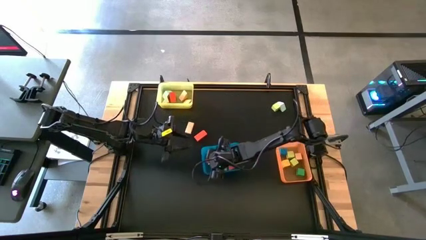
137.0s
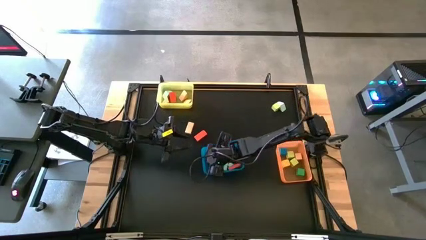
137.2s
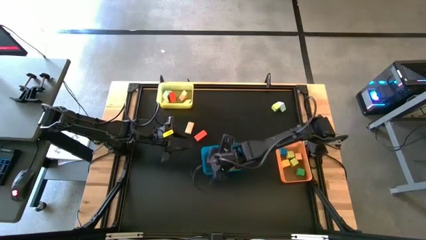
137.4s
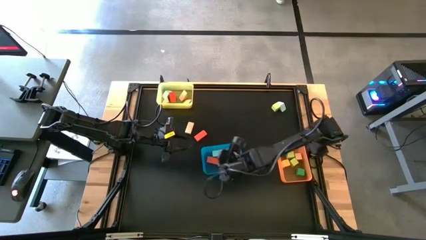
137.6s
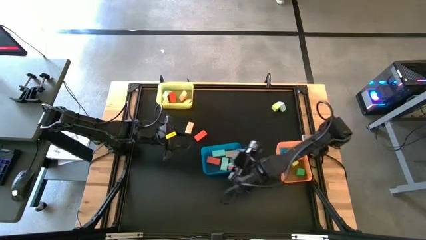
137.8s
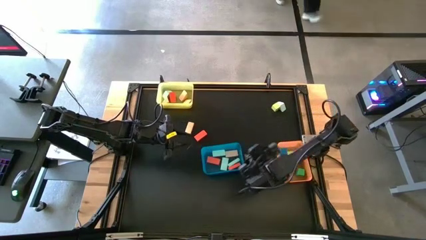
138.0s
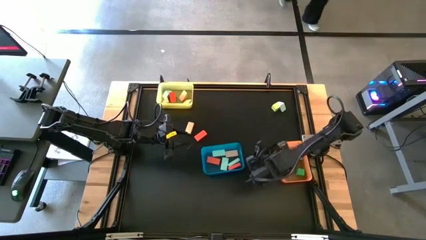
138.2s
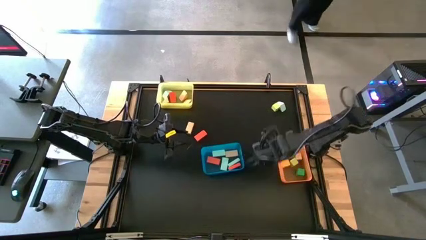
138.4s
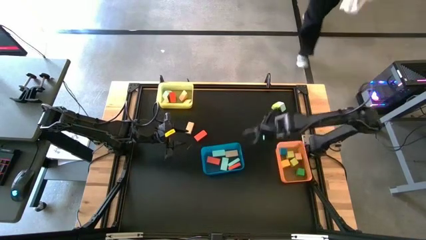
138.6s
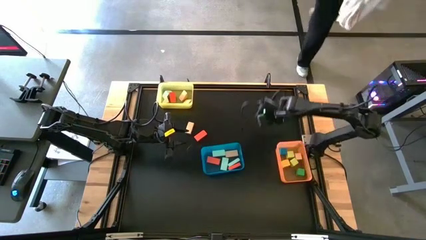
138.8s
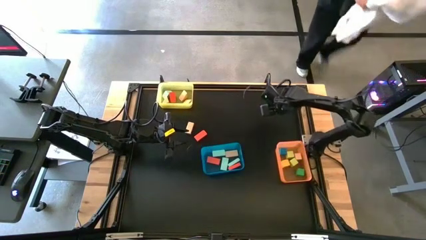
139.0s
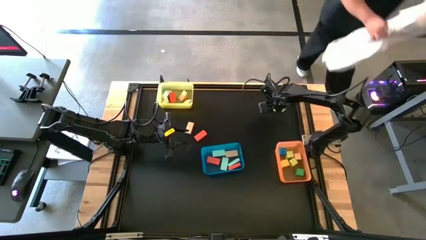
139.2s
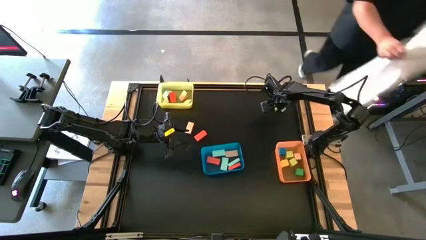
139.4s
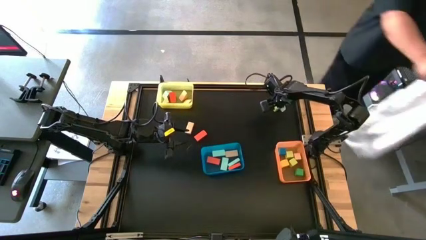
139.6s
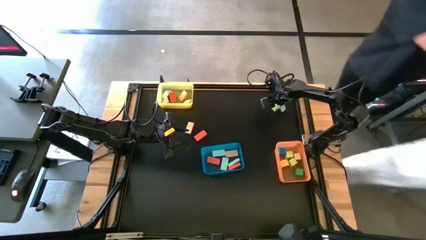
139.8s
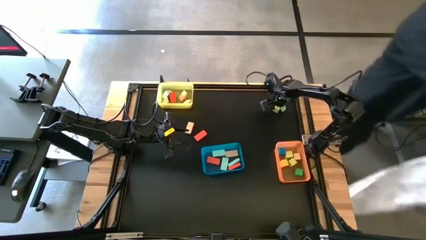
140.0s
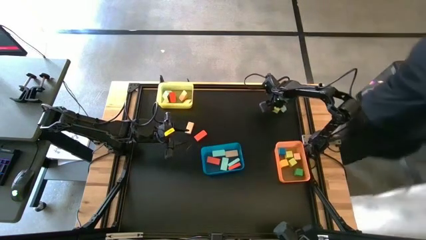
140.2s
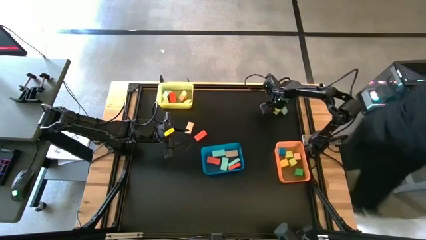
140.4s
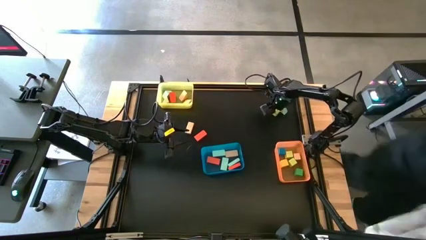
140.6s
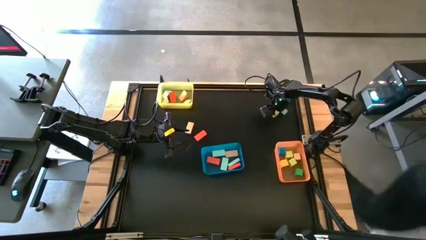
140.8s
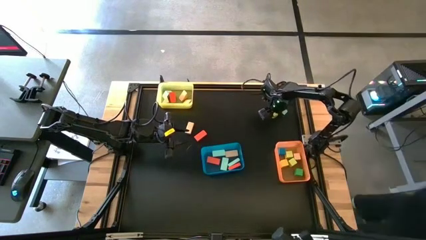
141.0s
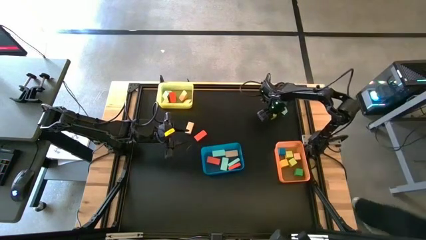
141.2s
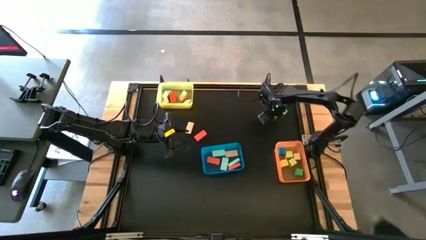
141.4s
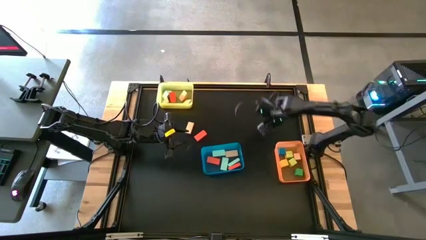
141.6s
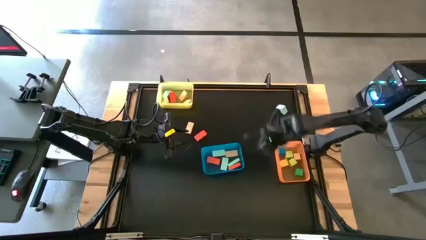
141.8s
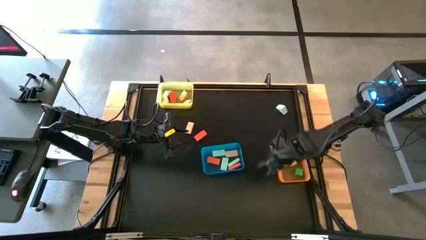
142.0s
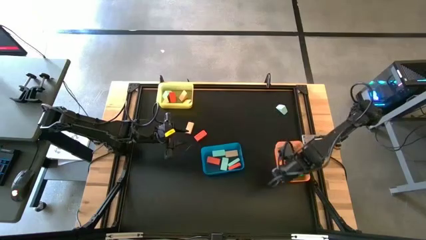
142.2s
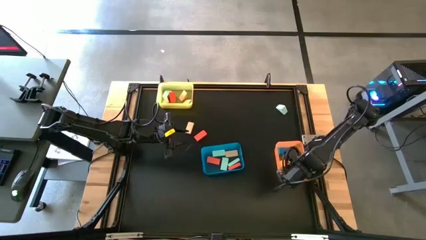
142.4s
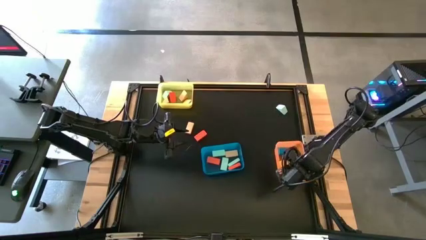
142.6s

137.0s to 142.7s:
Task: Sort blocks by size
Put the light green square block into the orange bin

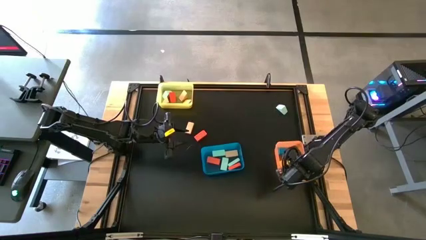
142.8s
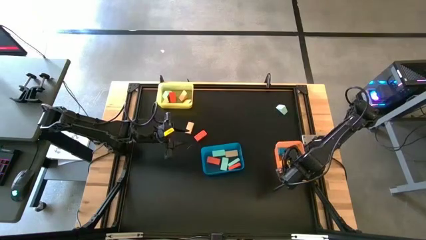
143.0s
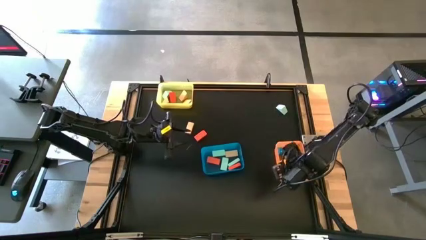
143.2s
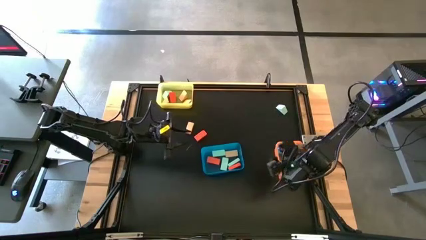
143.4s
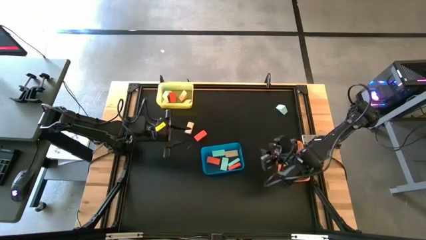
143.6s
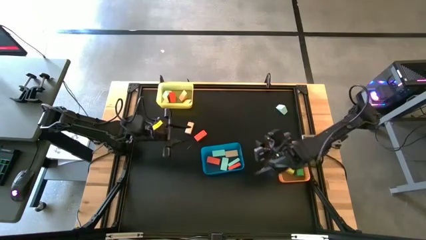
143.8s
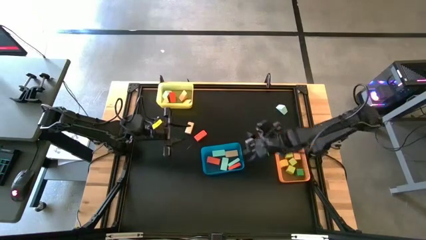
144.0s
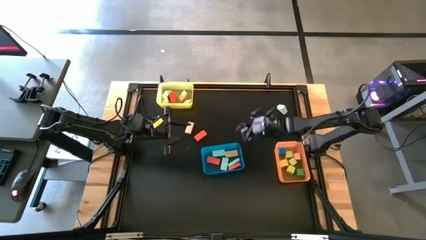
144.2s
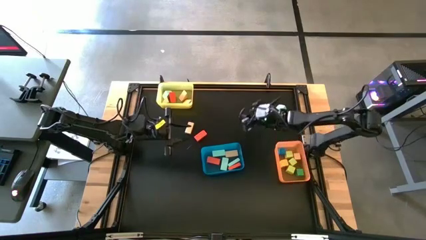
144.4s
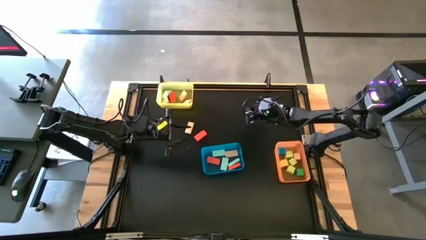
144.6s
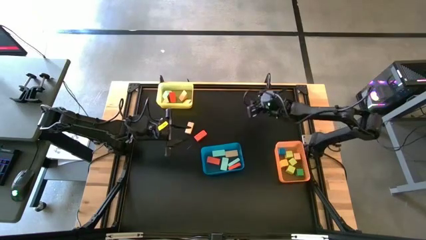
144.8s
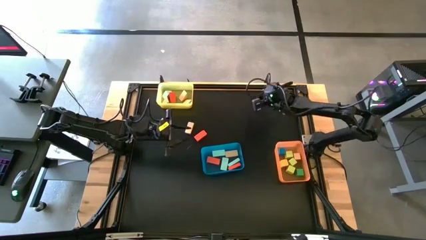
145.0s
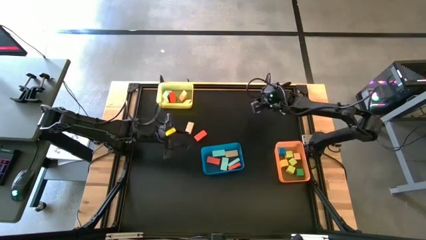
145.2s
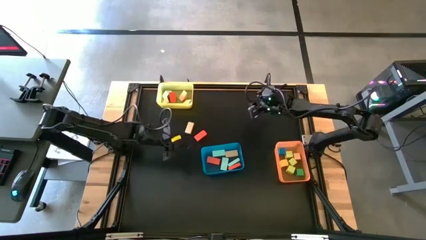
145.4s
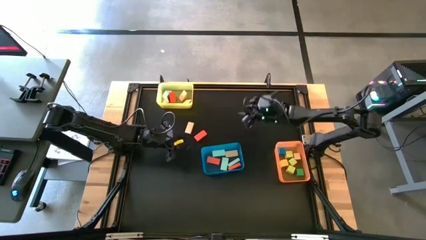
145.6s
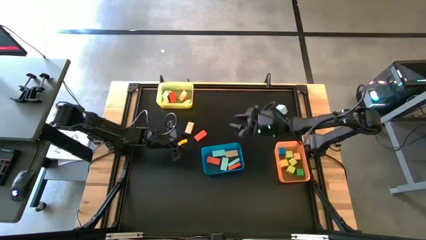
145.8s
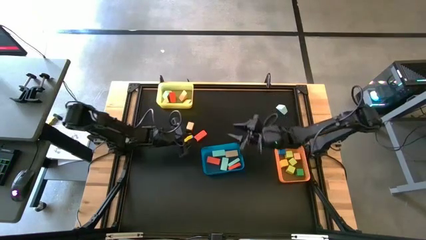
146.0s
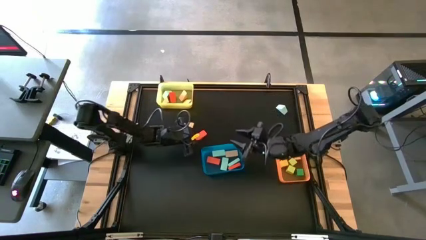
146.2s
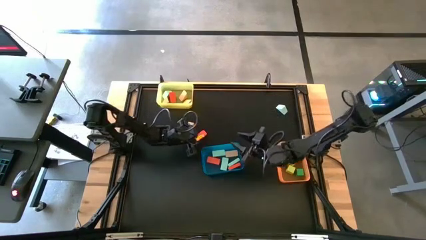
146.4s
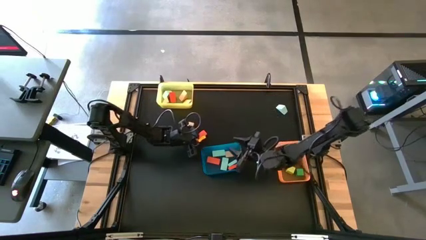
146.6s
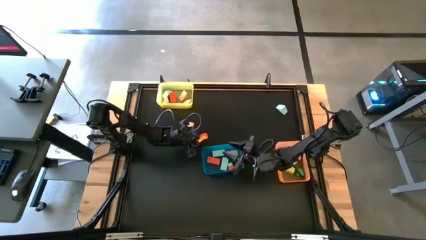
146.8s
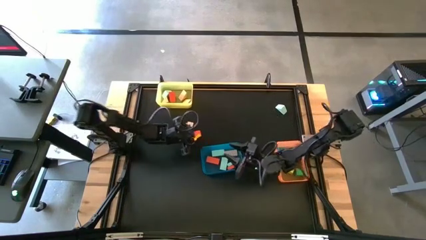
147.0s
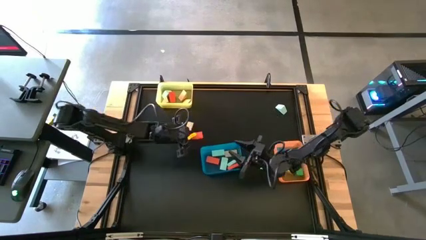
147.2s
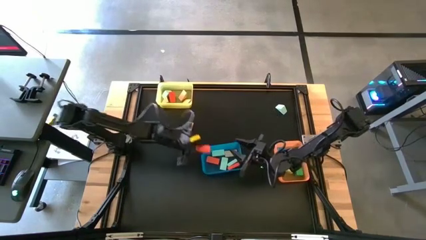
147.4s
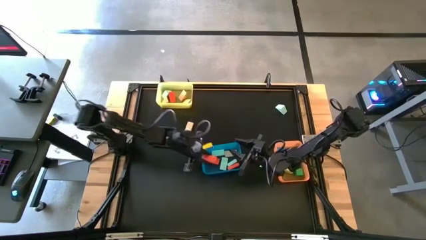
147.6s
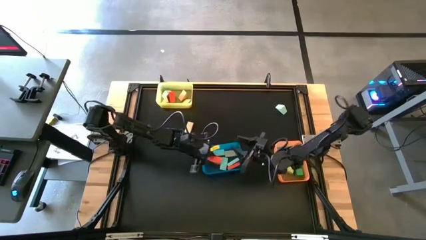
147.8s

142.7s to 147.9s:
Put the orange rectangular block into the blue bin

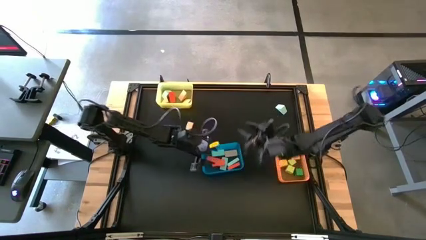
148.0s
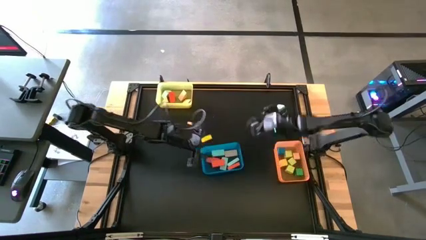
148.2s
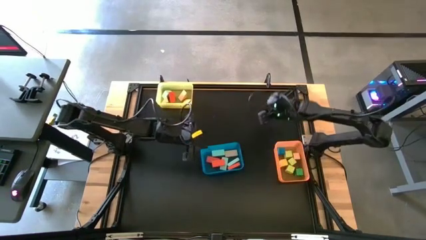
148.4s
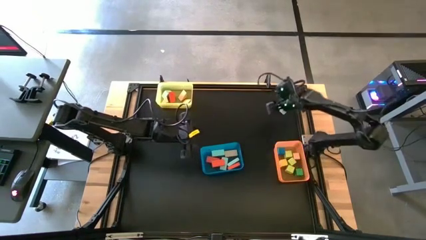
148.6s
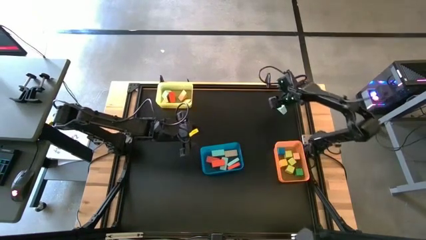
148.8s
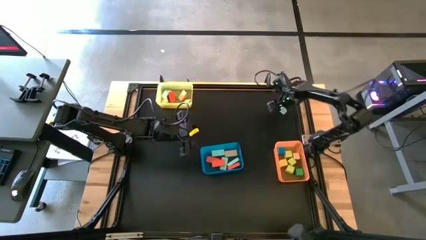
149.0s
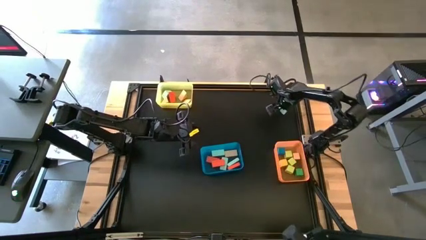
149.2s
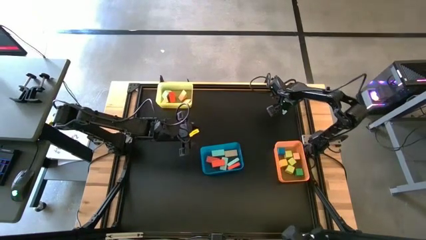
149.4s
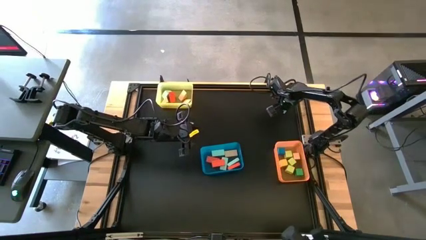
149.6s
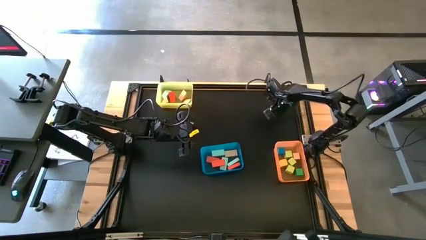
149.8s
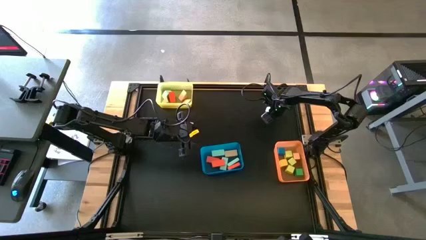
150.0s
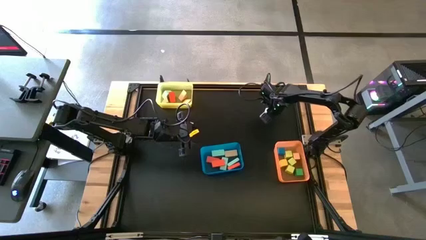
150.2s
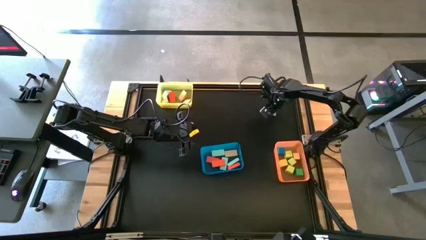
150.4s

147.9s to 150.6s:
Put the light blue triangular block into the yellow bin

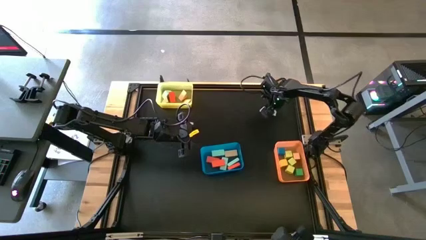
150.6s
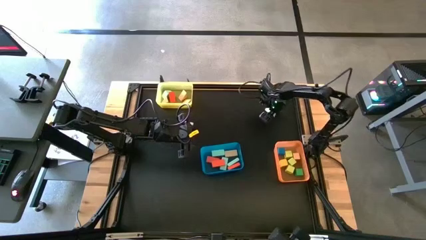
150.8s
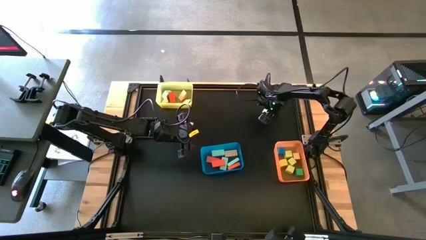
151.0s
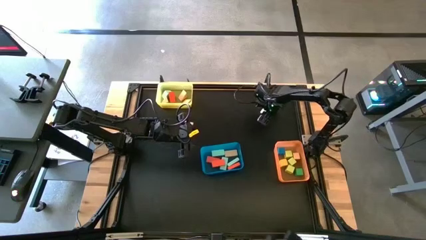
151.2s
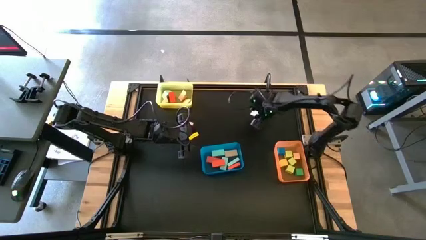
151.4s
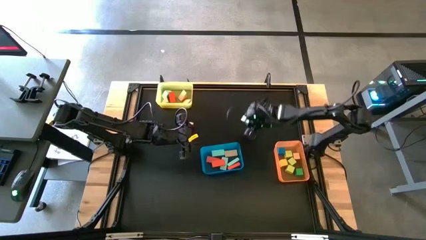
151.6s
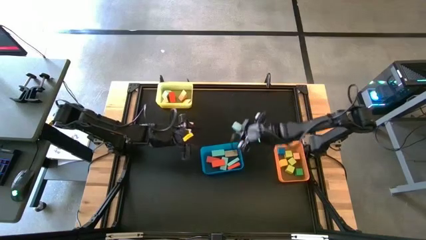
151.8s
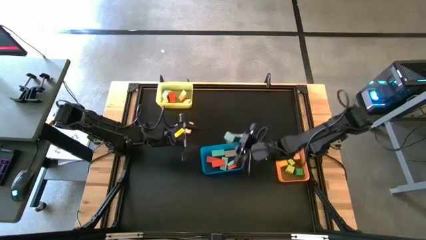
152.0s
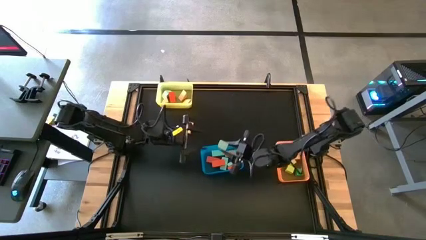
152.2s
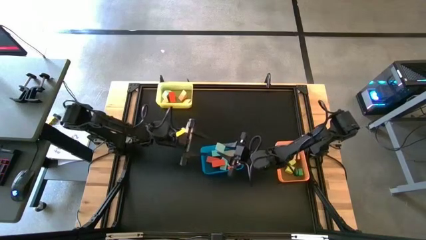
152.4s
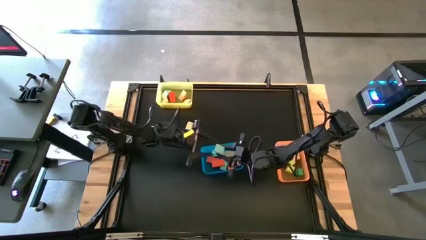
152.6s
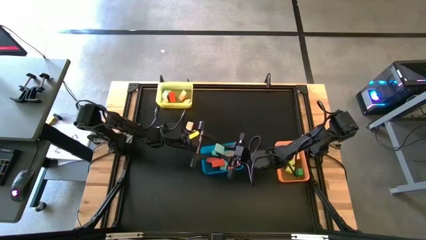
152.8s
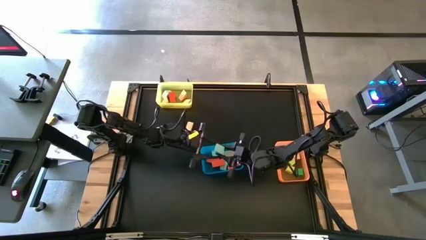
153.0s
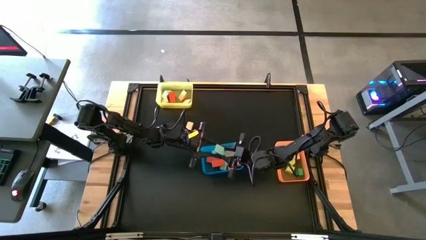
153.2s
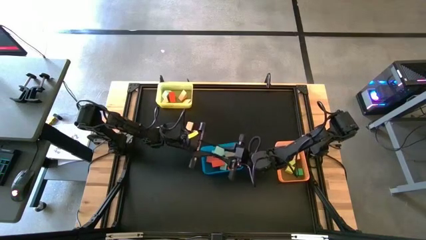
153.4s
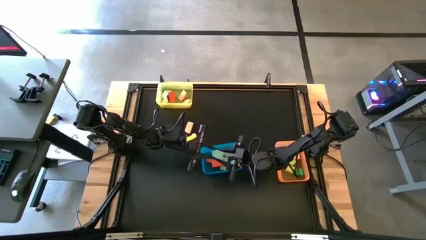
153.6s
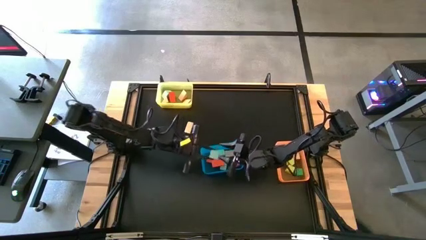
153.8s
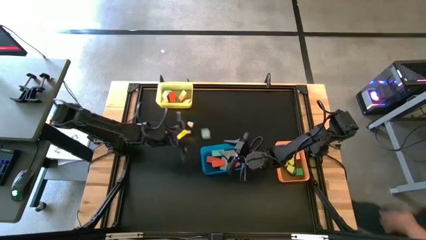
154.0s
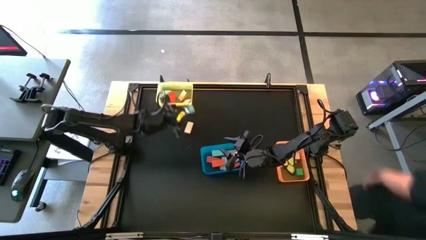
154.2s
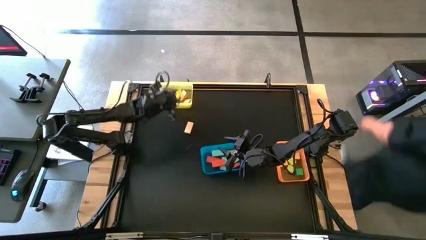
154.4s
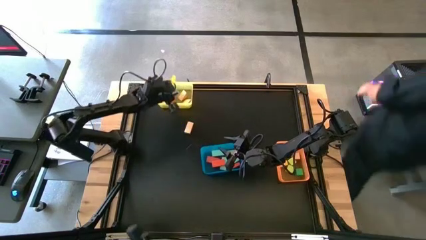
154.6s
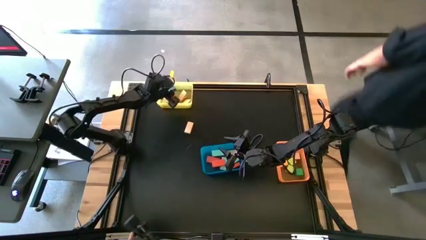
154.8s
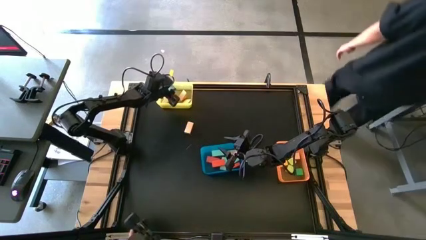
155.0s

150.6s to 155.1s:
Put the light blue triangular block into the yellow bin
